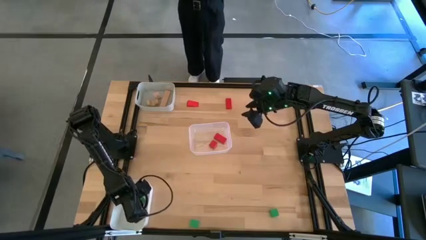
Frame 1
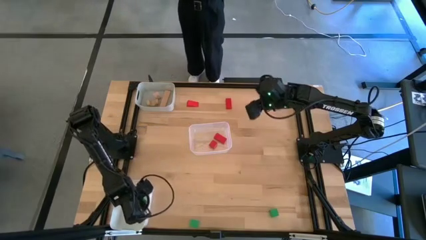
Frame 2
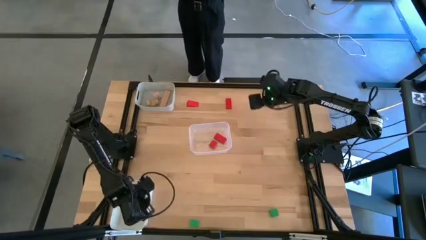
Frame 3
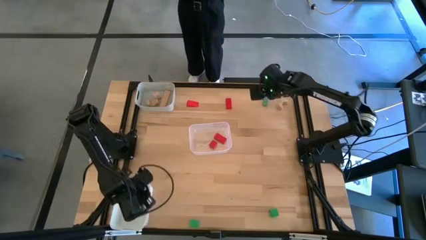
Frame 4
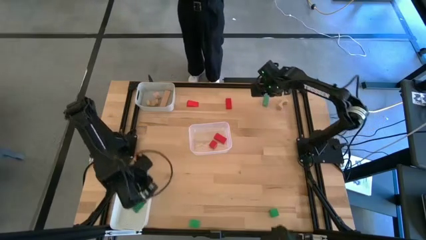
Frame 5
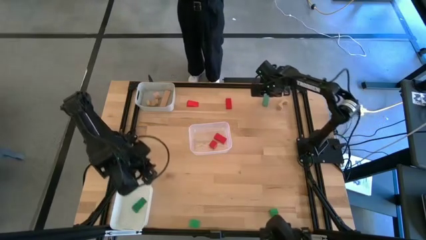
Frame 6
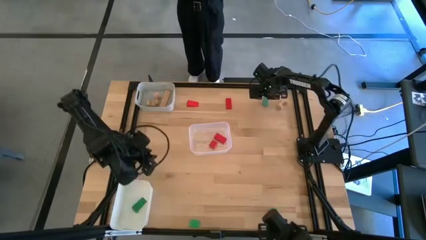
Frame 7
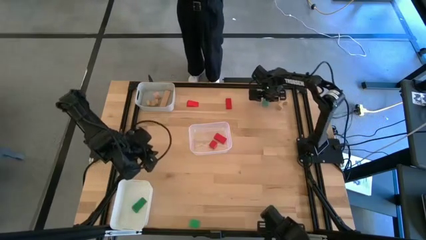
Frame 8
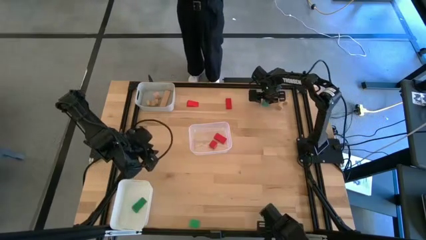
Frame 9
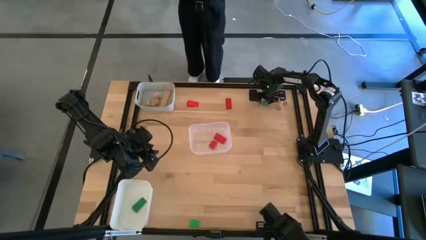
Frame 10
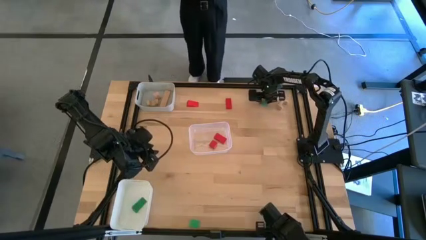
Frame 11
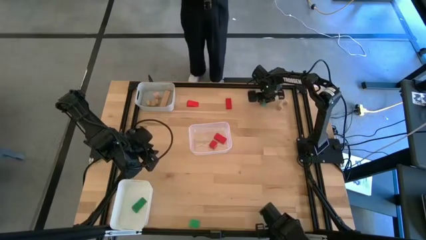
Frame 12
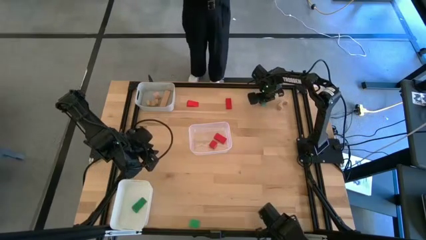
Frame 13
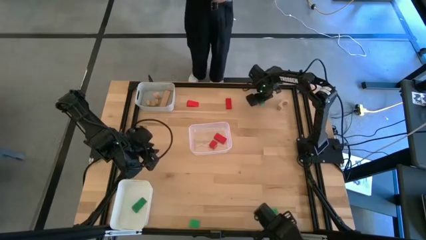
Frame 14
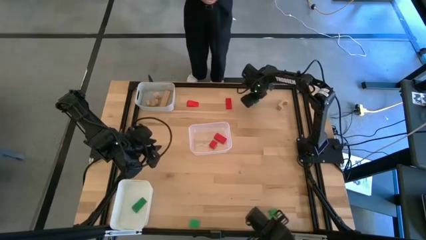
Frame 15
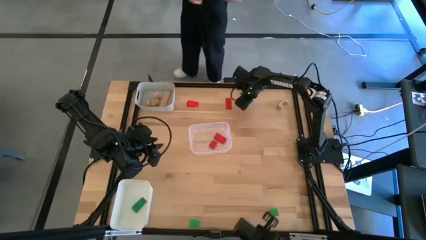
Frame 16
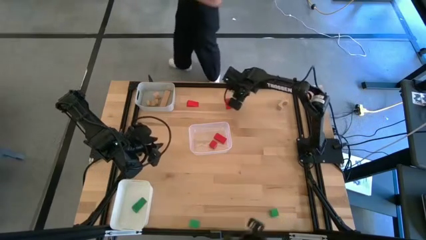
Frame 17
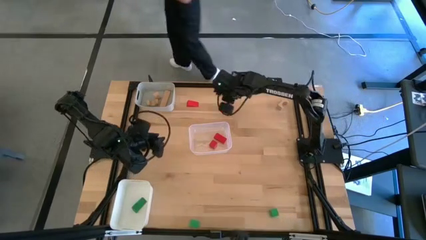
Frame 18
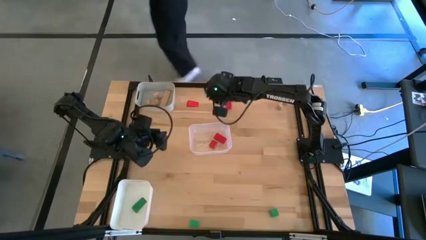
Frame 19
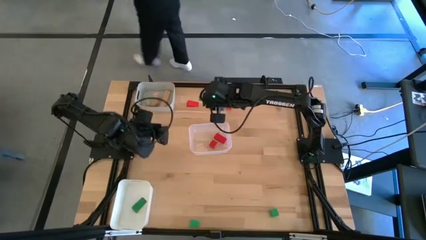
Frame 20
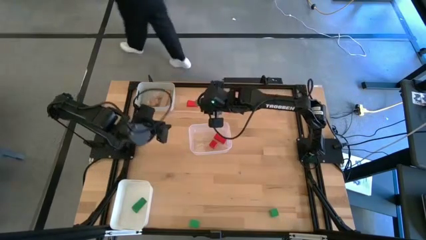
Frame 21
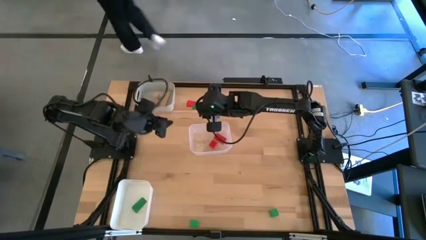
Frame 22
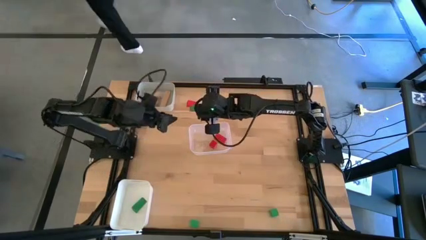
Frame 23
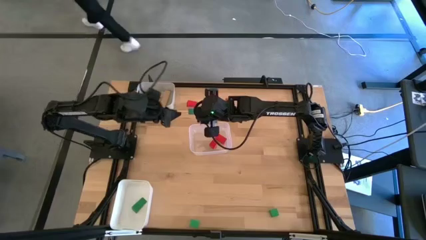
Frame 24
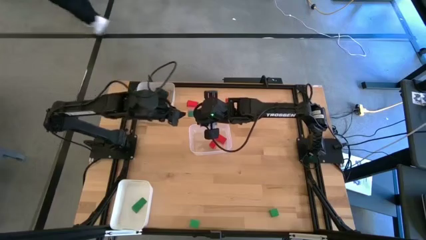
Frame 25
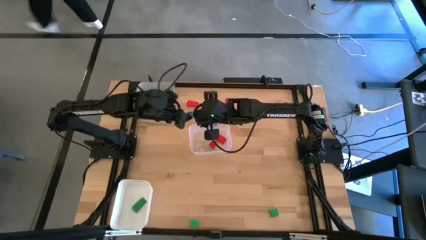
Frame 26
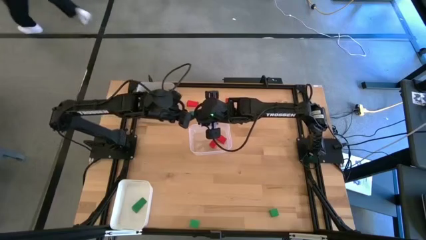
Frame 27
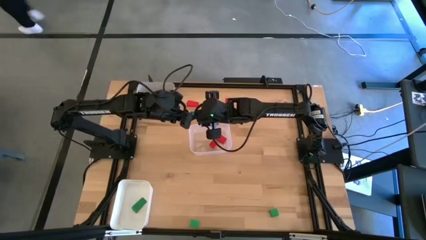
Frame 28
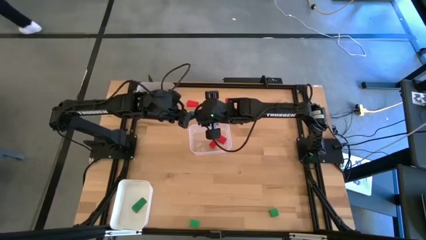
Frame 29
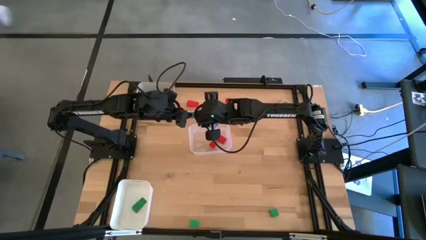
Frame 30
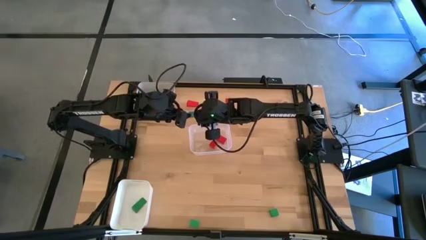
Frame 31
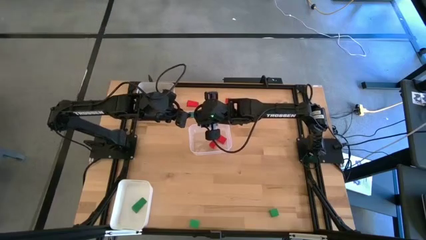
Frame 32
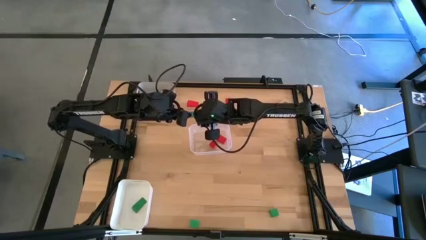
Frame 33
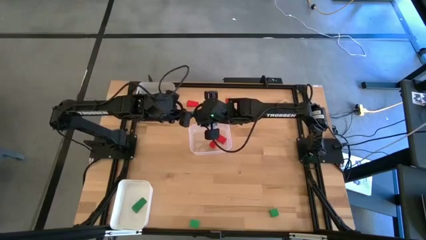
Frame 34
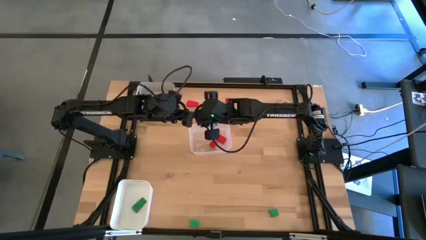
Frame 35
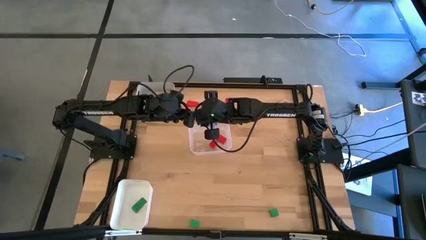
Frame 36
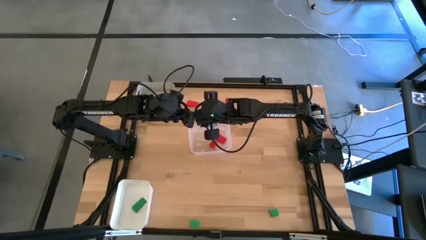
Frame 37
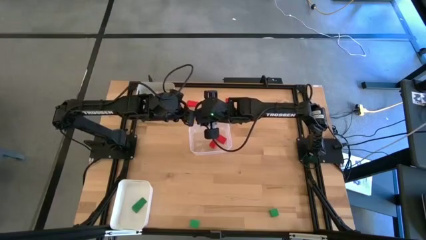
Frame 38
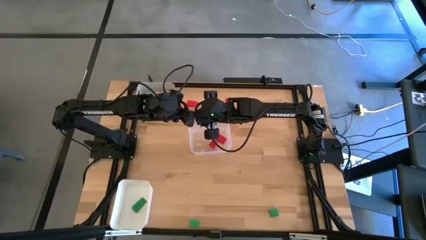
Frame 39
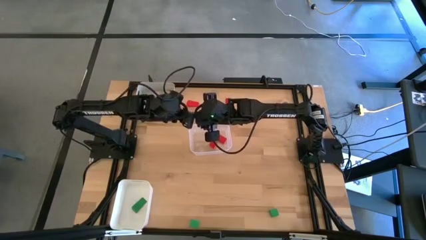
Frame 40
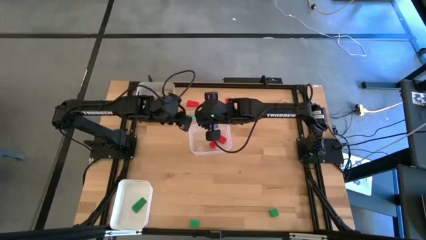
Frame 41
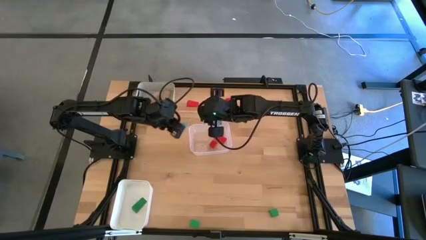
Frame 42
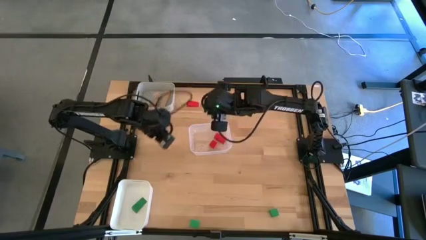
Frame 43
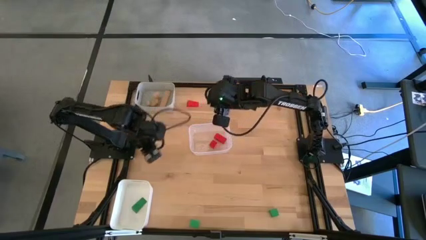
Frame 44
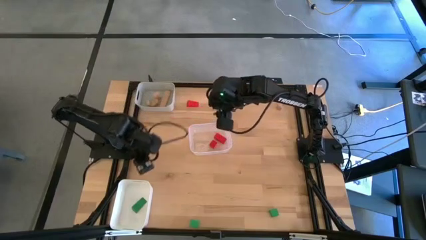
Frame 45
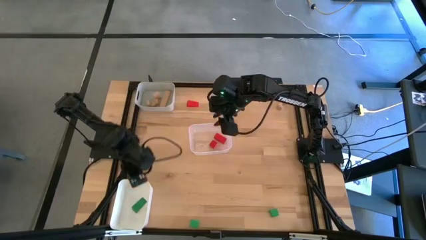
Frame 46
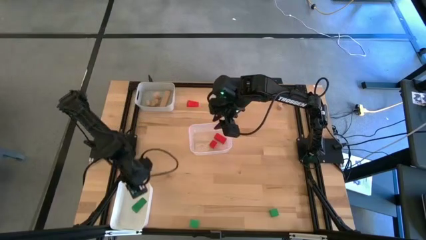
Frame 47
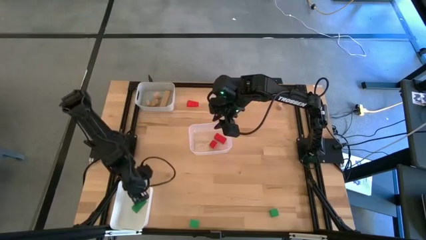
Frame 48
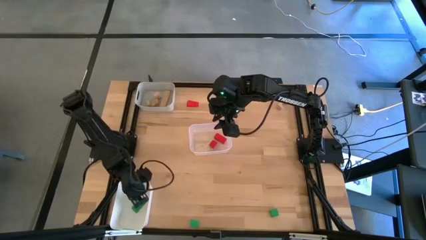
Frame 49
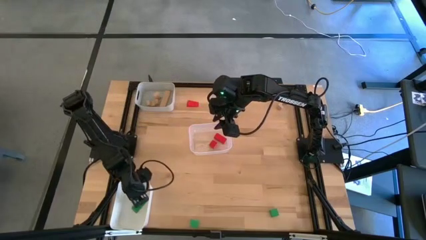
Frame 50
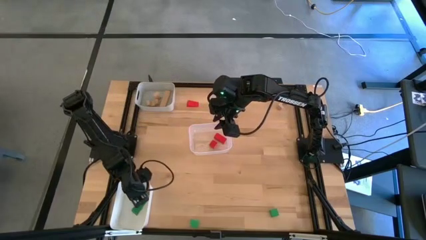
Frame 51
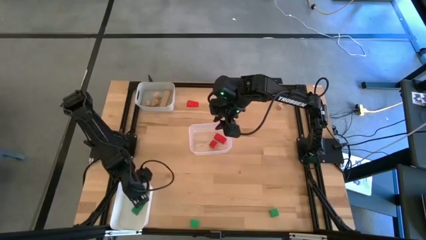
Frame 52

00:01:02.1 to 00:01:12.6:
Task: Sort & place blocks by color
Put the green block into the white bin

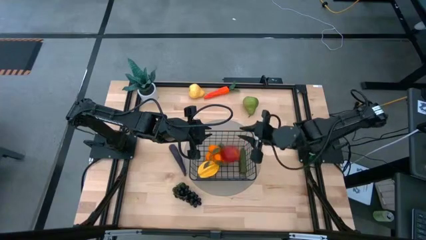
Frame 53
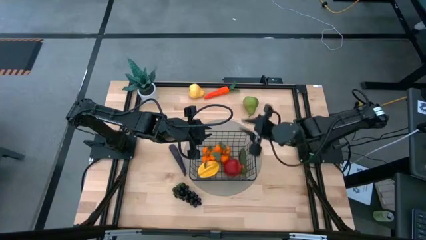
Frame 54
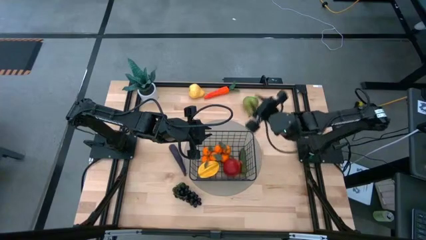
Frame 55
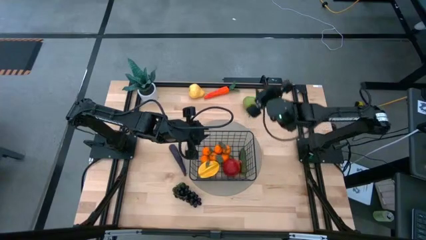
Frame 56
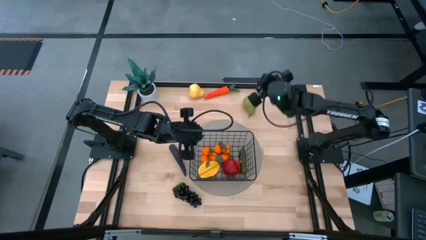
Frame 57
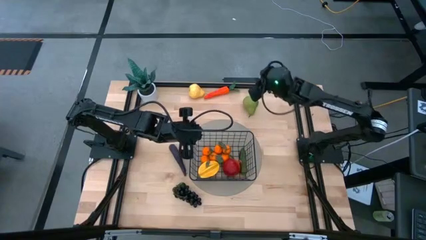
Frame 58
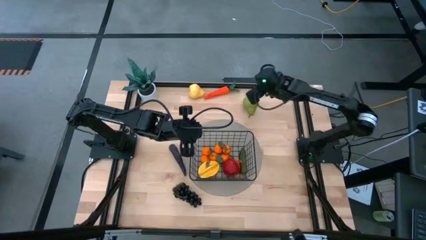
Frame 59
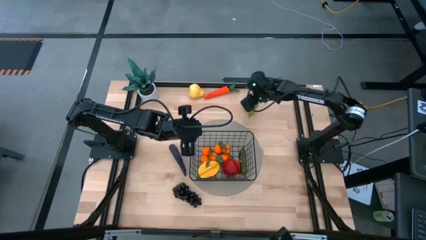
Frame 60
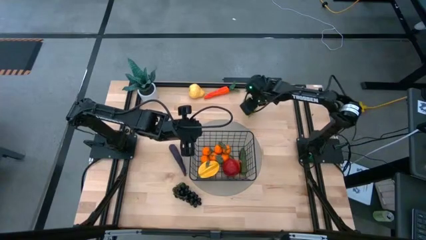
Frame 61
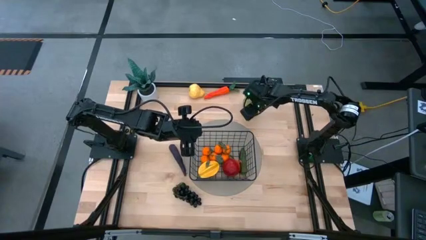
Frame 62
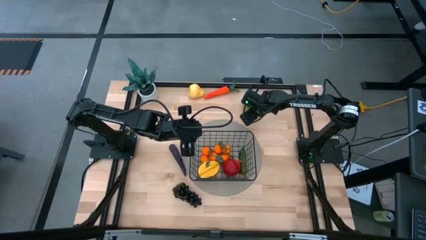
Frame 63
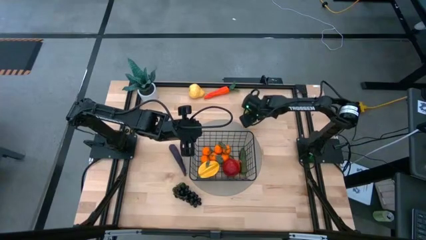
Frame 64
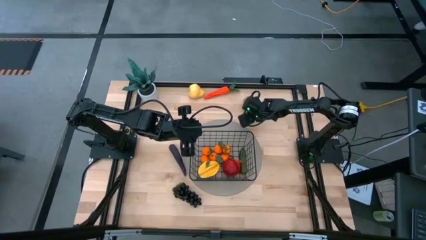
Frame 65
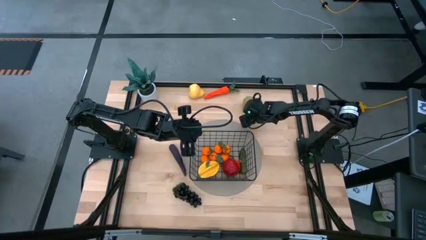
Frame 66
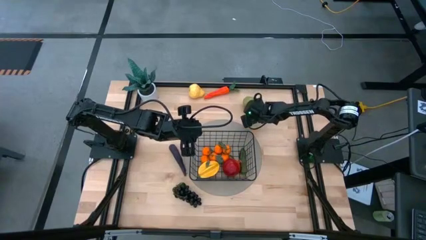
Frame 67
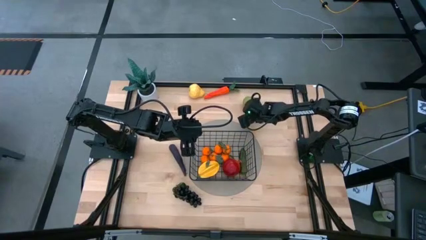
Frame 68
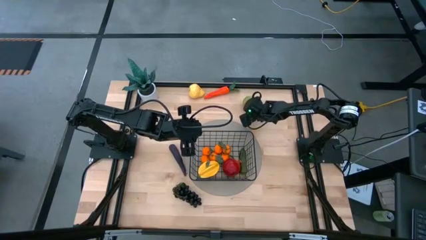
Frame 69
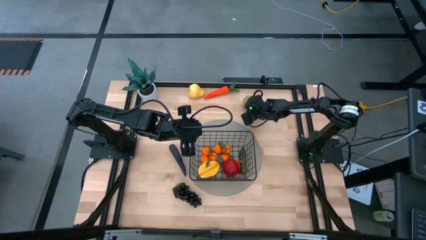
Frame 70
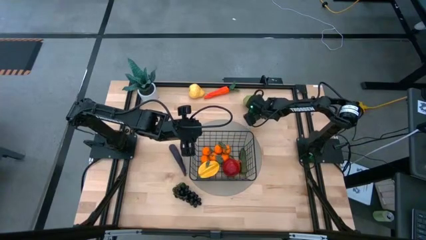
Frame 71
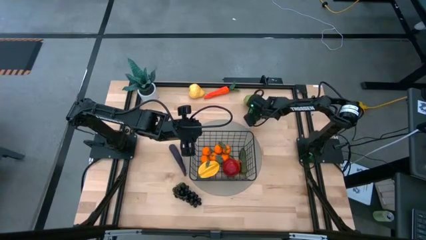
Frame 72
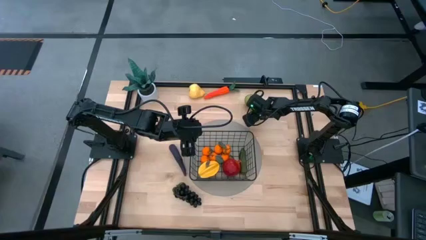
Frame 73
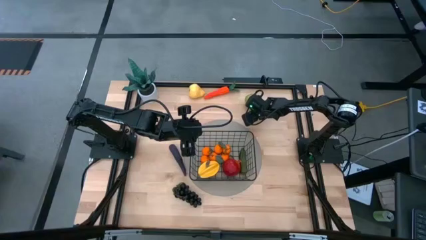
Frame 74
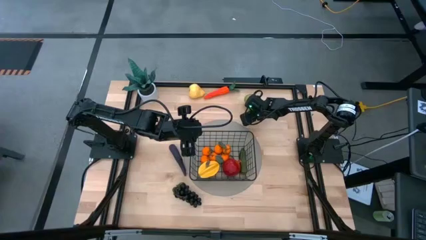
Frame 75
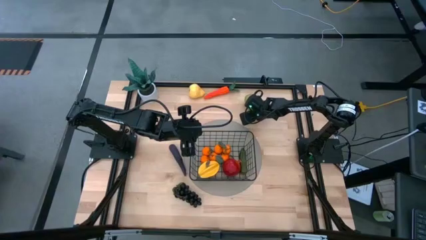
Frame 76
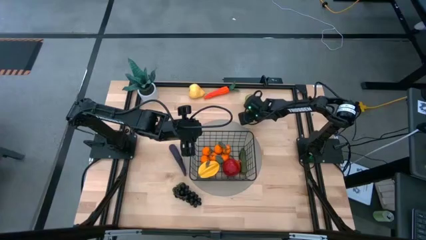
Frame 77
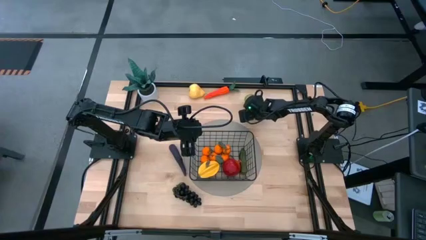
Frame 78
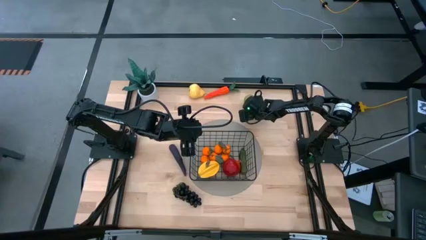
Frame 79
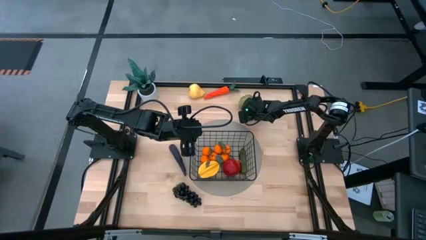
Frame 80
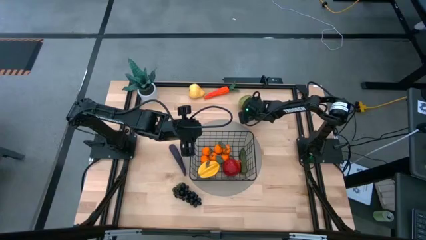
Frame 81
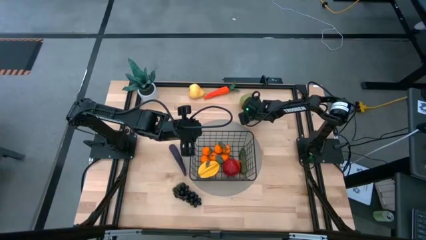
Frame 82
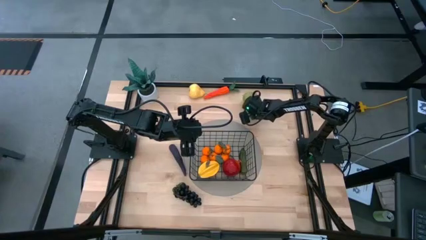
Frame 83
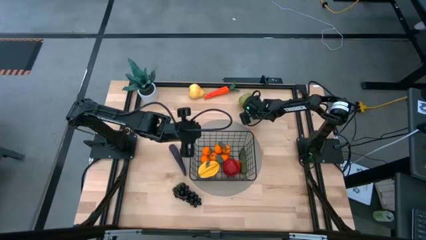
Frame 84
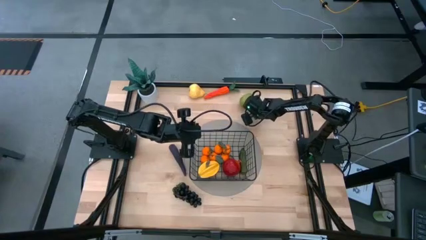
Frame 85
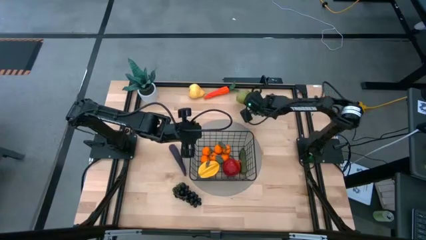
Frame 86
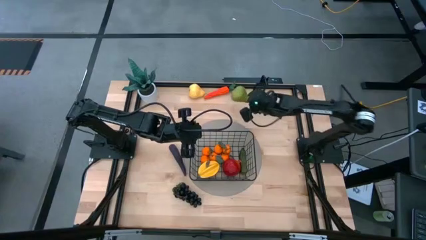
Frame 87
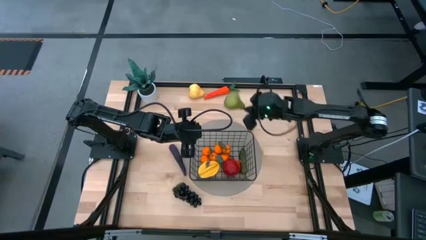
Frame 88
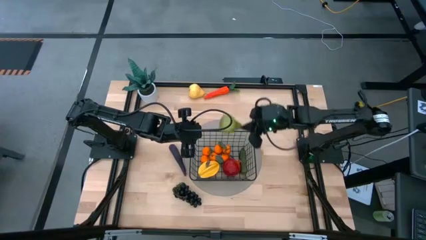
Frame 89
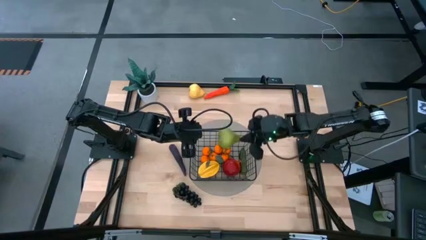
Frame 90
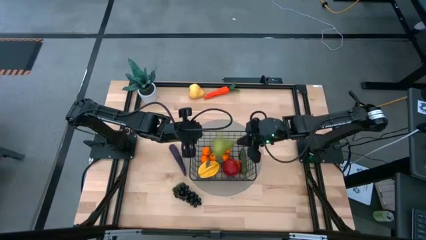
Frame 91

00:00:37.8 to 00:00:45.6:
Task: Build produce basket
Put the green pear into the black wire basket
